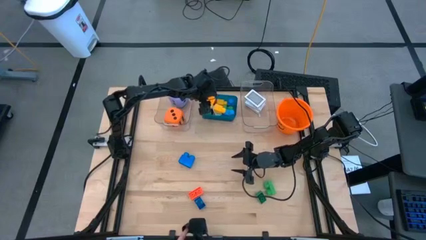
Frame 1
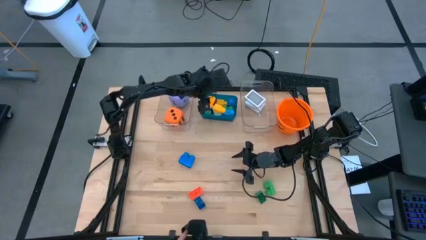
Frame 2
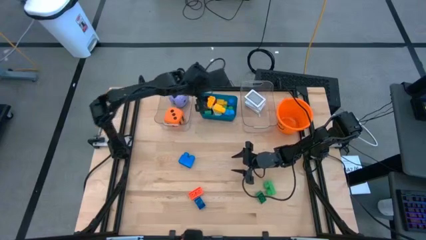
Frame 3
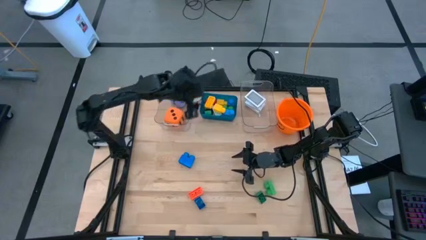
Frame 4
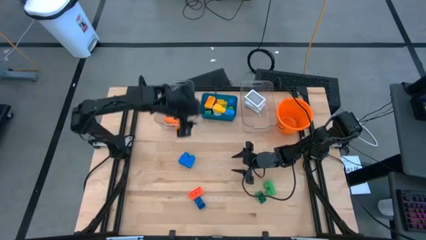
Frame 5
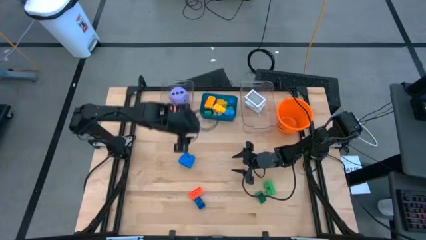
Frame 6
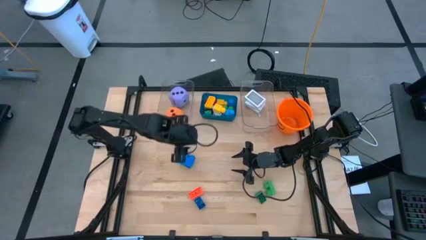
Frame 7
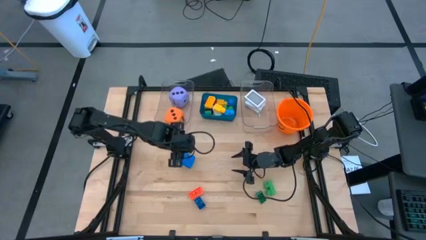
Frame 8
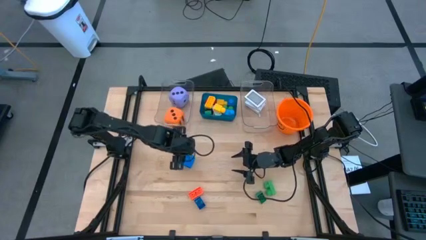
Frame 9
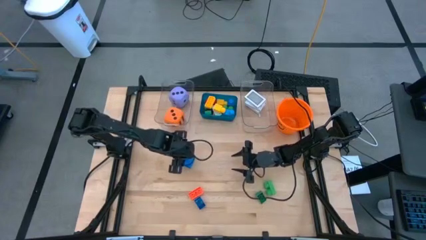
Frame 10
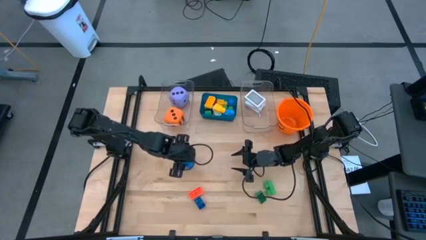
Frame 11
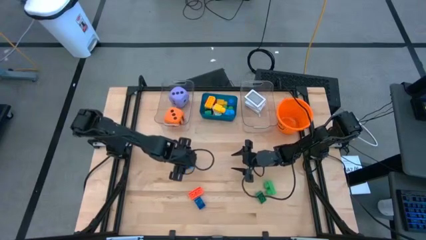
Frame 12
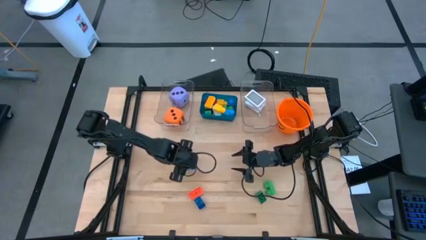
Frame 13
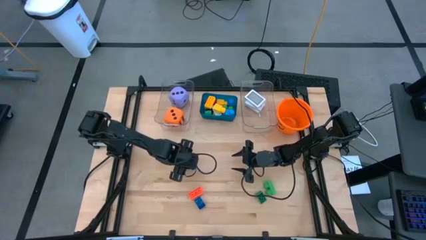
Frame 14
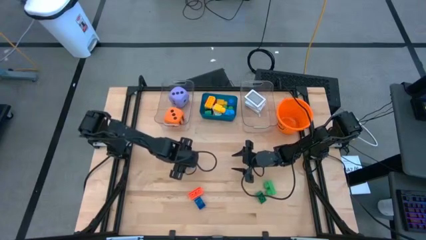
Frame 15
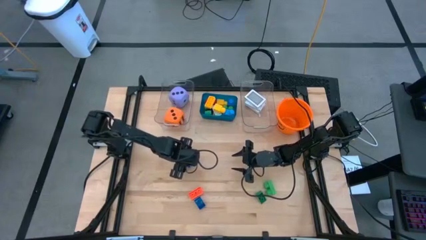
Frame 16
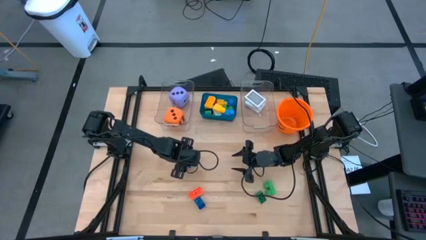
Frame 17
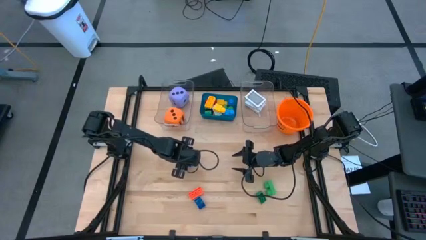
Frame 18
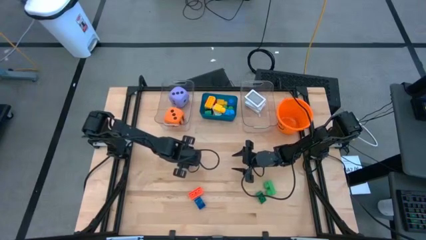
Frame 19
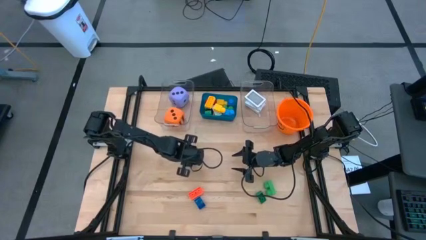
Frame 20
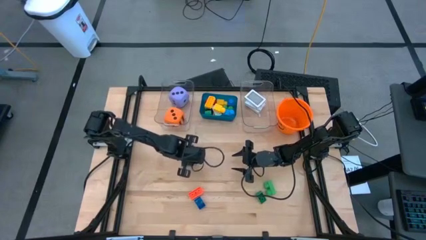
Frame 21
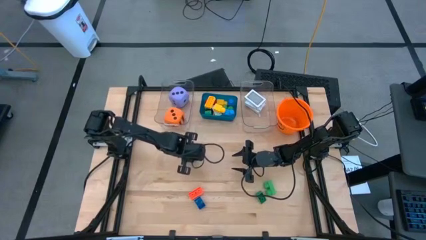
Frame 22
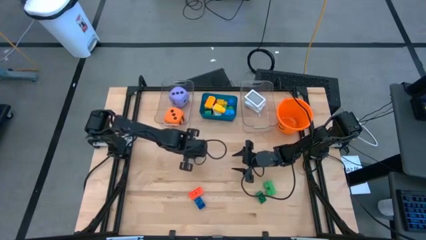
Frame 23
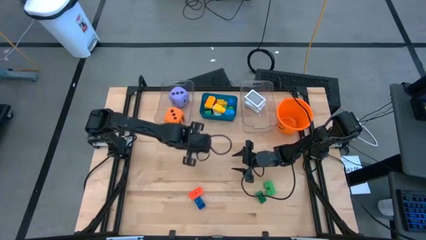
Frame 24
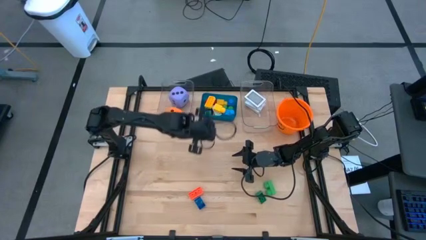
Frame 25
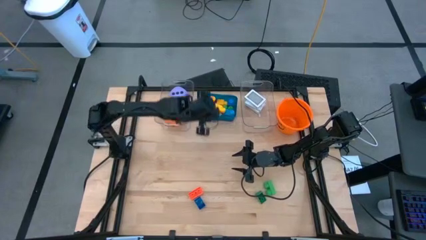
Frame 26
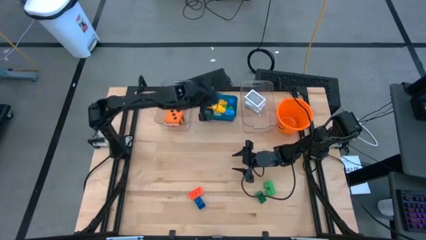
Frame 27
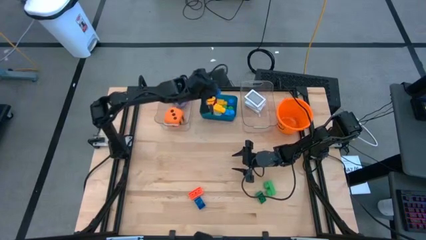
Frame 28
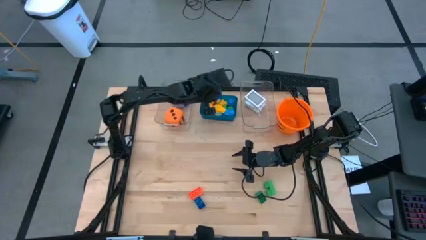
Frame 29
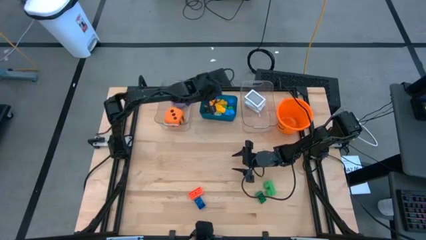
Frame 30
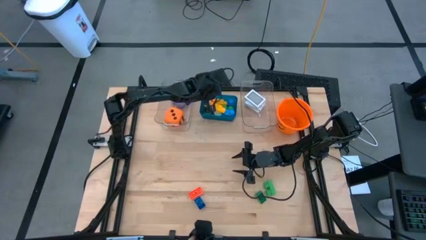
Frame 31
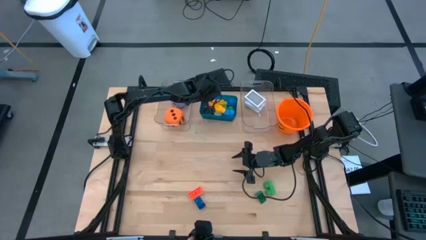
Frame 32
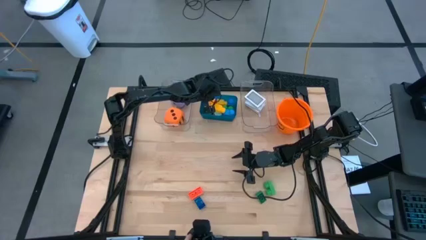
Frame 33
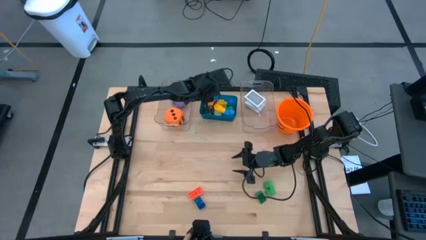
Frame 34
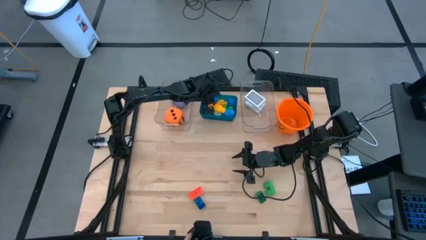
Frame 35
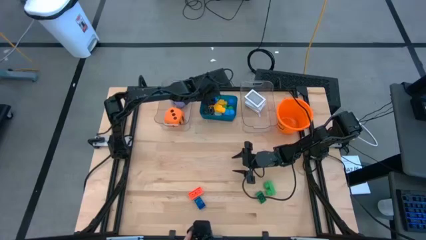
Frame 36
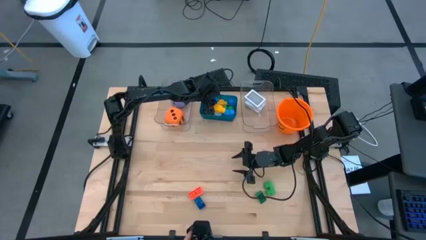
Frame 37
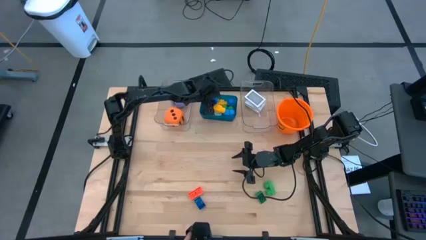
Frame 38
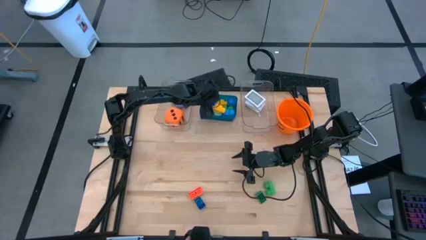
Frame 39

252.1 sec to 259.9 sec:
Task: Pick & Place Toys
Put the blue game piece into the blue bin

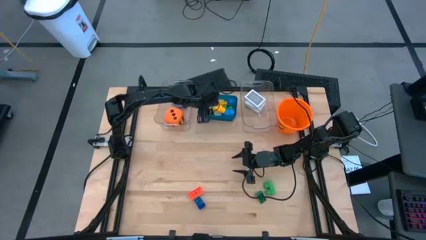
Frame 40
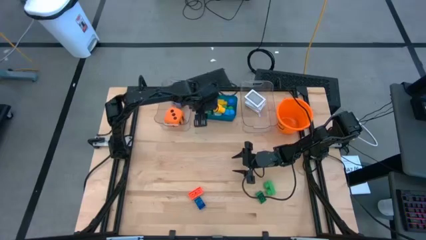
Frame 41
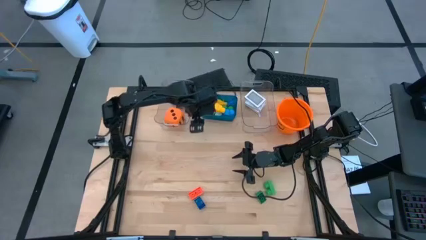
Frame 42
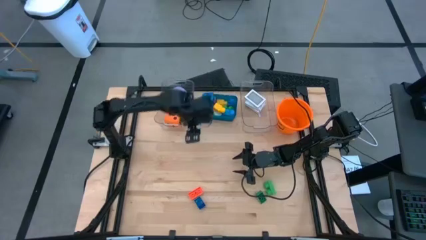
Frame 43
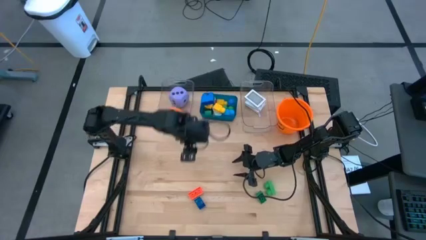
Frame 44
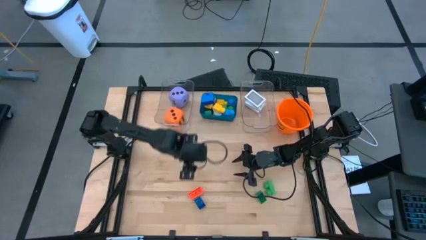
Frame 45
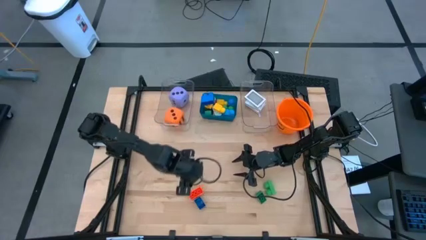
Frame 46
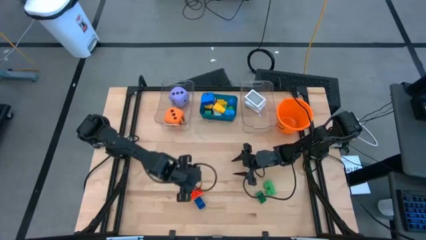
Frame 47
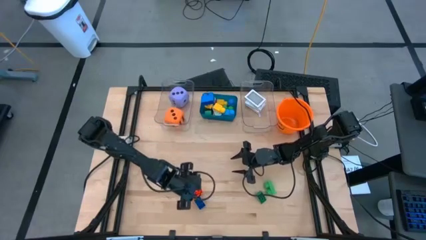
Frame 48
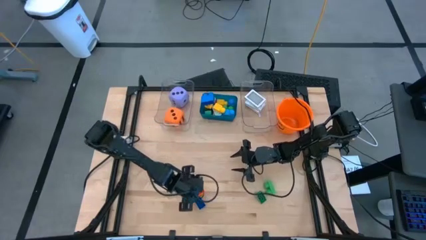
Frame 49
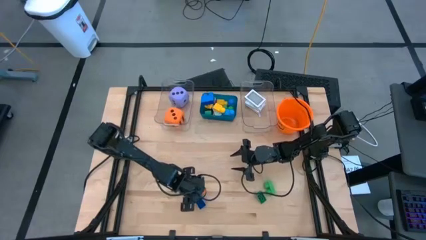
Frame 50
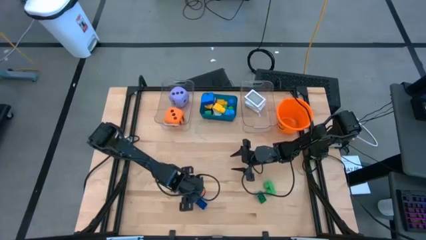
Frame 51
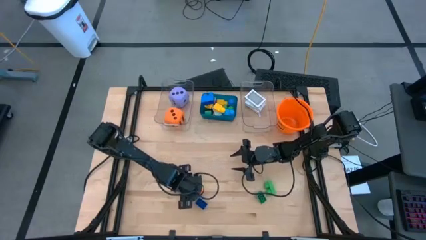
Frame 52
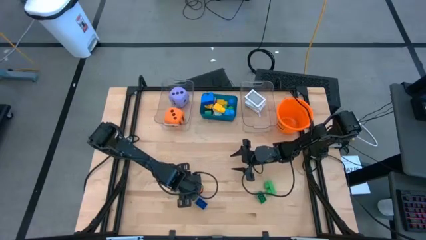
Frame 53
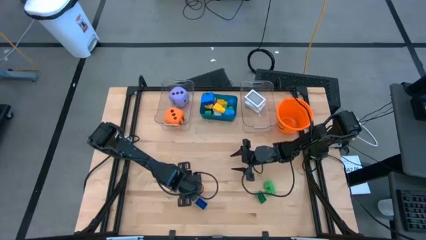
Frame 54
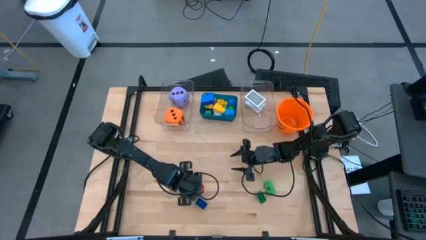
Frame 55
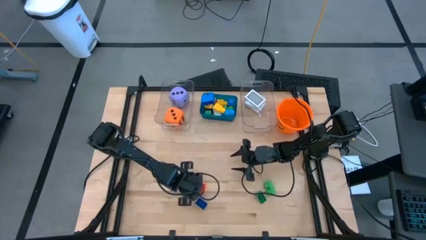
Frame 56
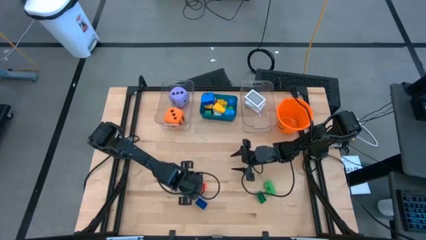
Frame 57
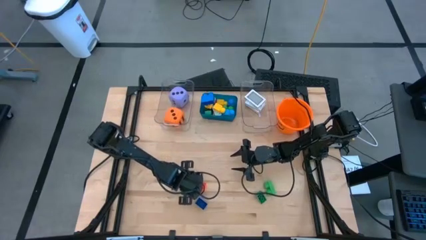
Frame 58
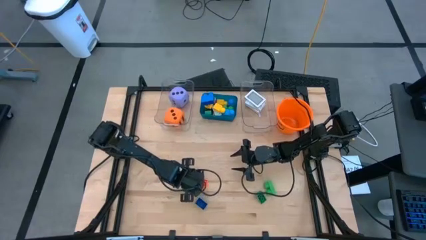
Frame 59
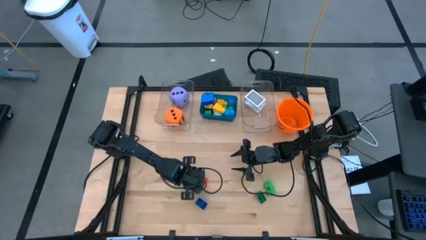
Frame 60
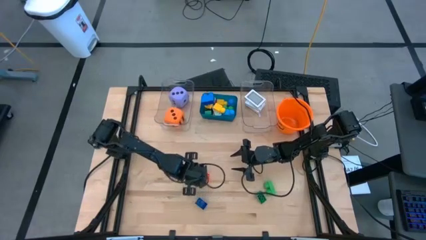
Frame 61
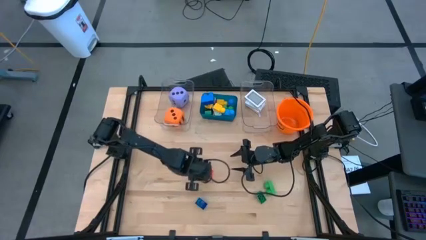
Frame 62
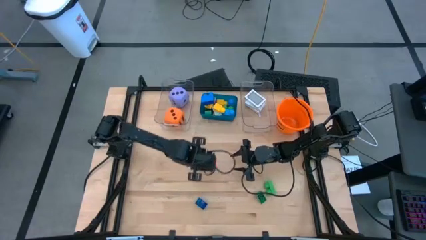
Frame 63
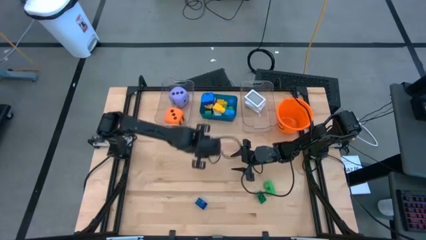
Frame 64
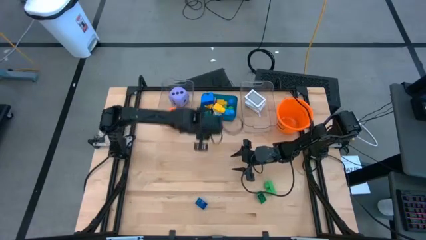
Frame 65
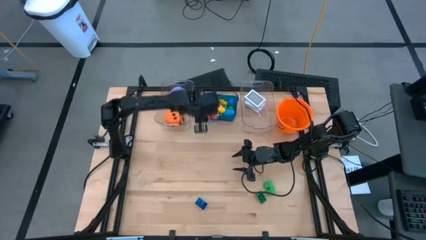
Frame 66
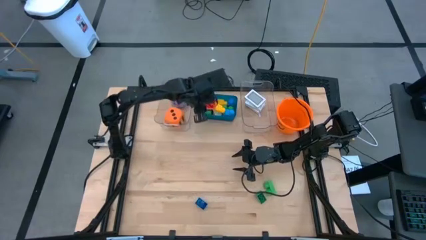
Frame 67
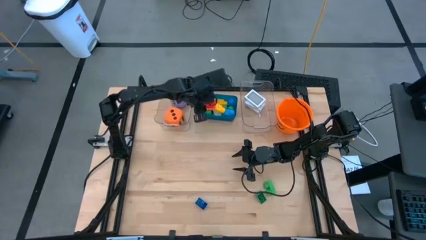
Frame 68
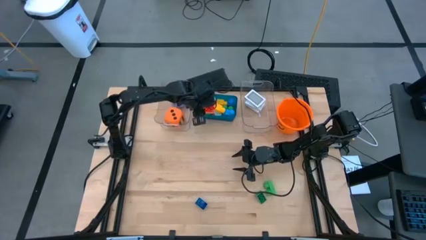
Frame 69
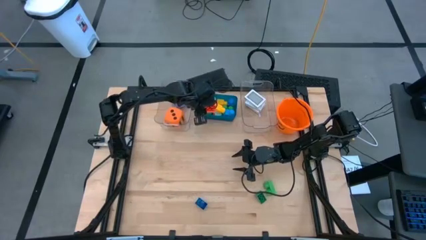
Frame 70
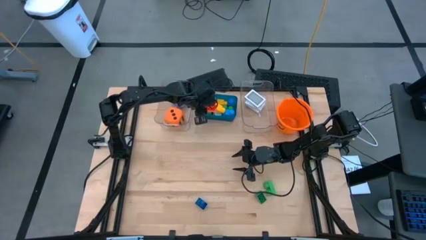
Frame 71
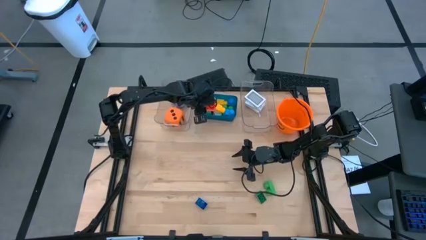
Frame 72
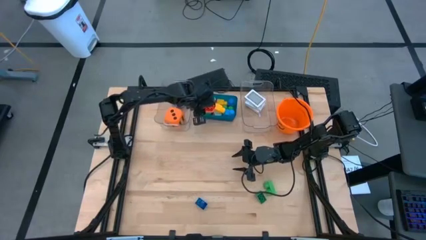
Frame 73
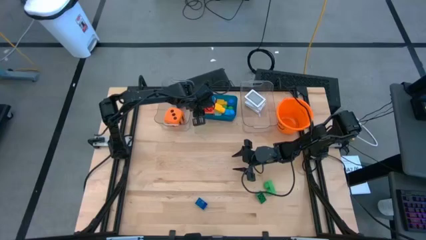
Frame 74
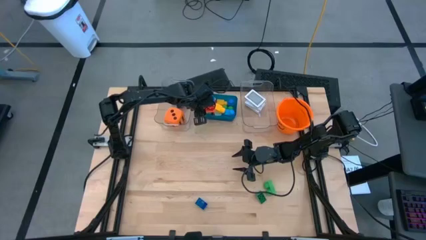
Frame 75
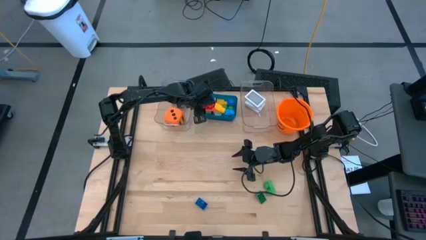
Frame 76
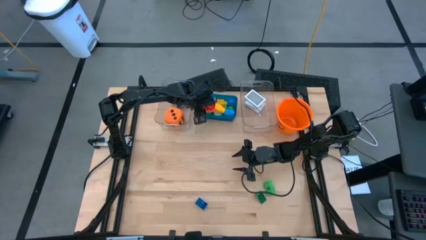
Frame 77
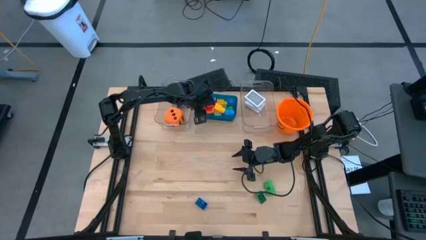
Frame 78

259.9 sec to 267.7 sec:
Put the orange game piece into the blue bin
